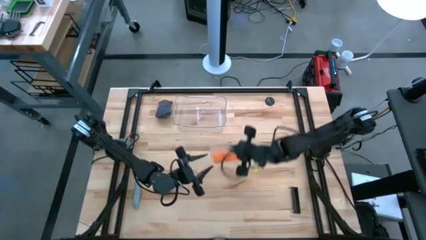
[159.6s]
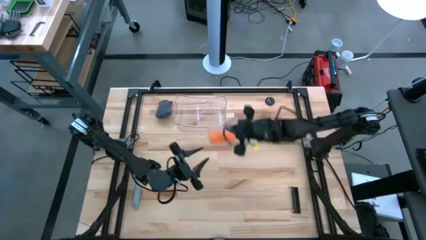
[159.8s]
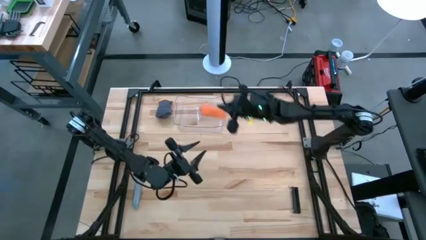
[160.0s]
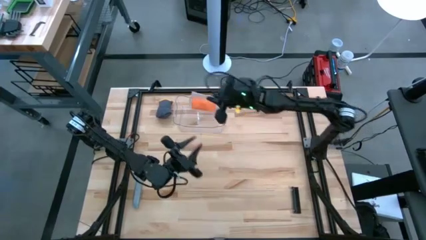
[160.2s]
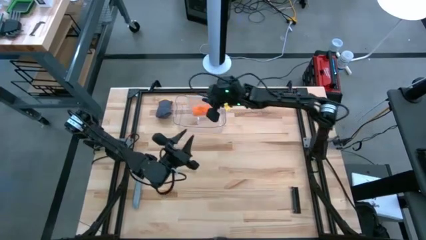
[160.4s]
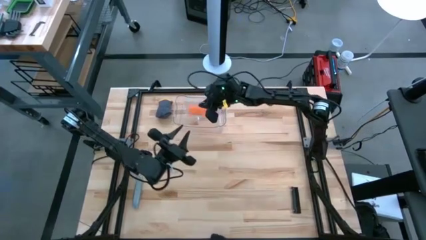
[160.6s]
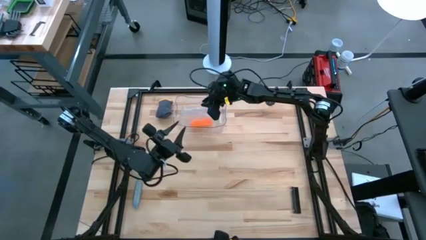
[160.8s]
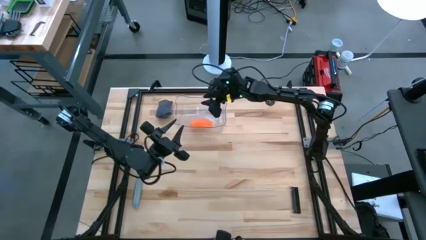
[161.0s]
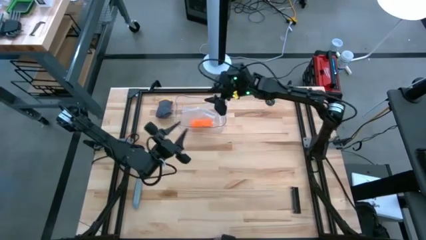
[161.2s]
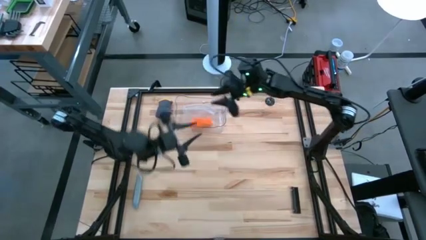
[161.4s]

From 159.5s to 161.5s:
Task: Roll bandage
Put the transparent ziplock into the transparent bin

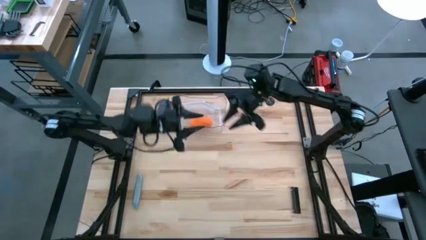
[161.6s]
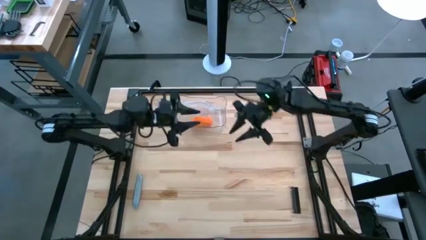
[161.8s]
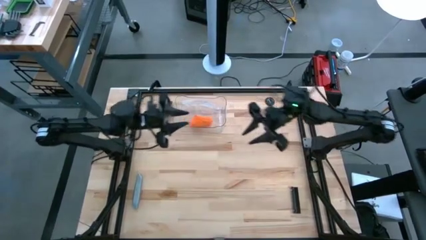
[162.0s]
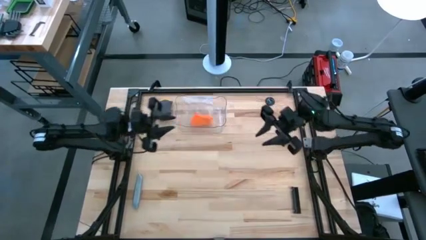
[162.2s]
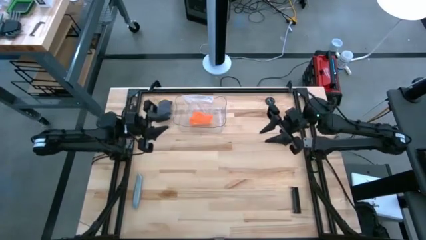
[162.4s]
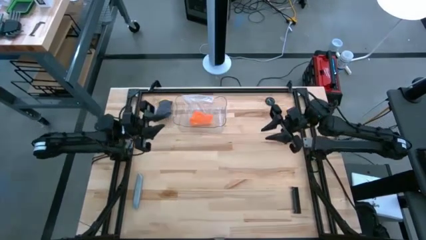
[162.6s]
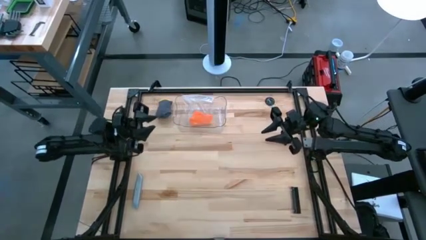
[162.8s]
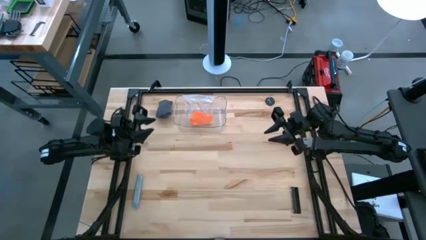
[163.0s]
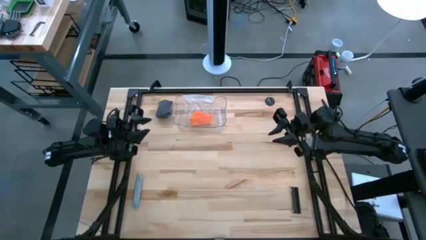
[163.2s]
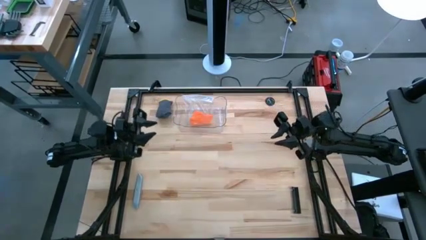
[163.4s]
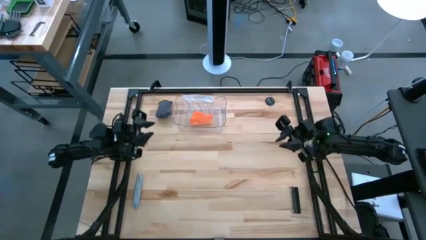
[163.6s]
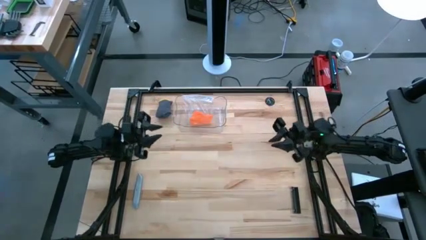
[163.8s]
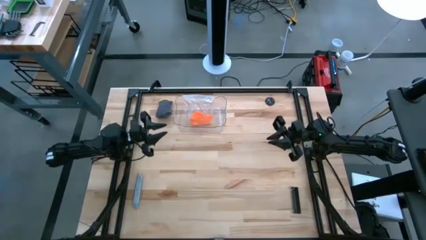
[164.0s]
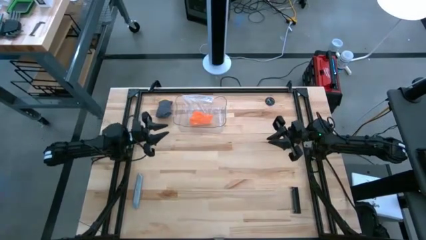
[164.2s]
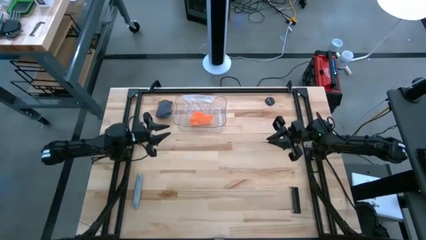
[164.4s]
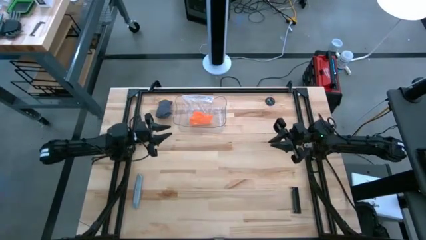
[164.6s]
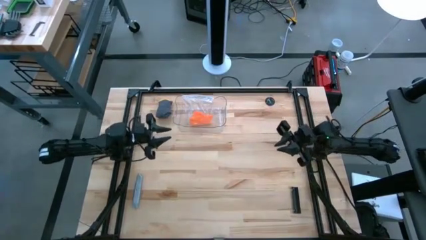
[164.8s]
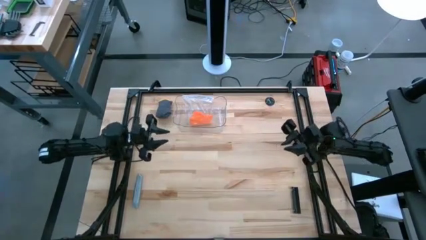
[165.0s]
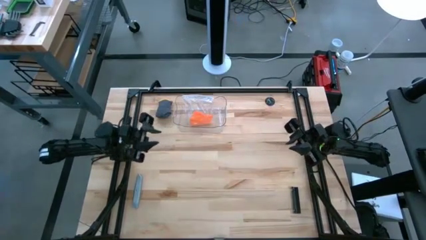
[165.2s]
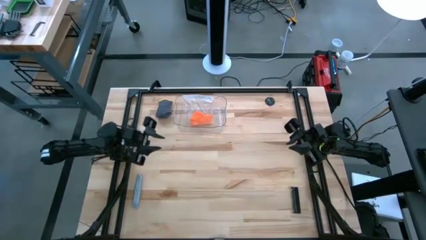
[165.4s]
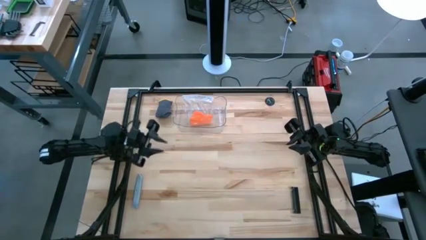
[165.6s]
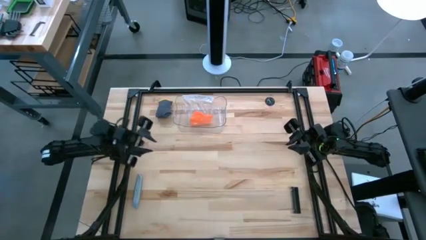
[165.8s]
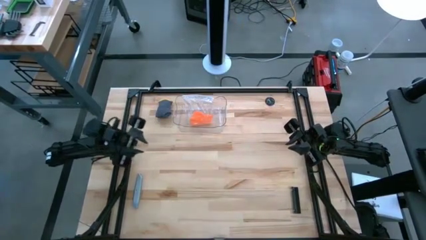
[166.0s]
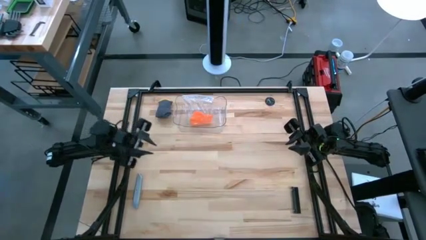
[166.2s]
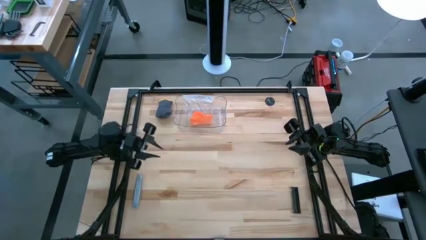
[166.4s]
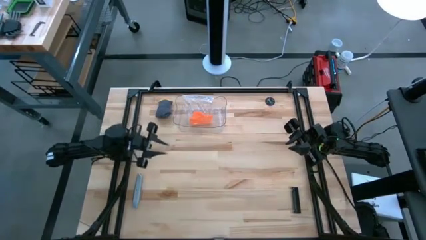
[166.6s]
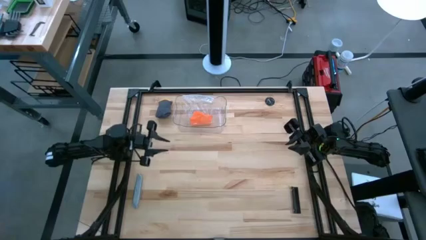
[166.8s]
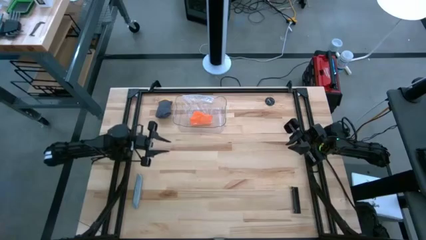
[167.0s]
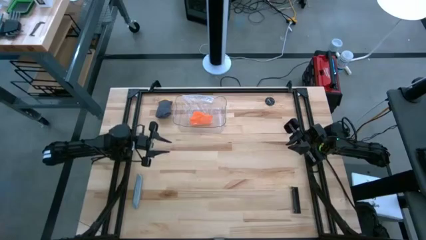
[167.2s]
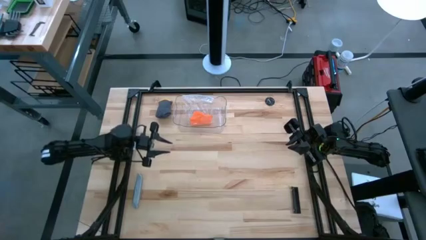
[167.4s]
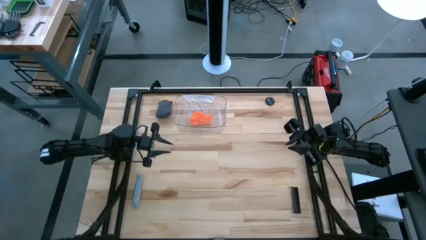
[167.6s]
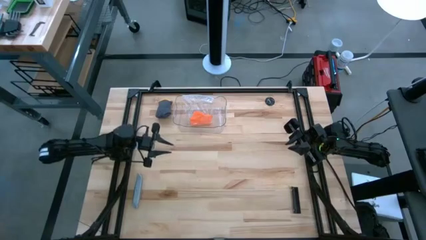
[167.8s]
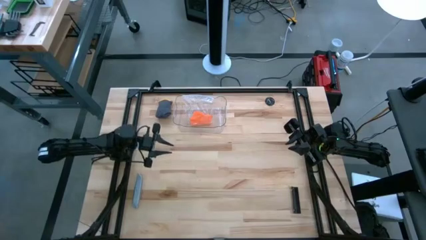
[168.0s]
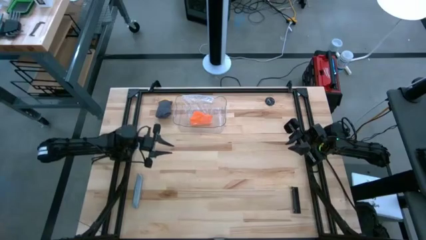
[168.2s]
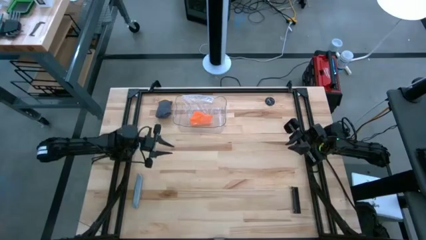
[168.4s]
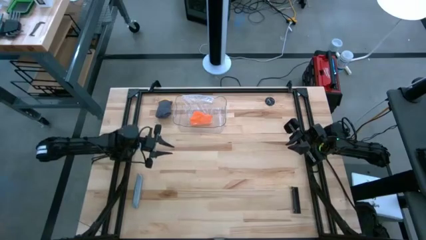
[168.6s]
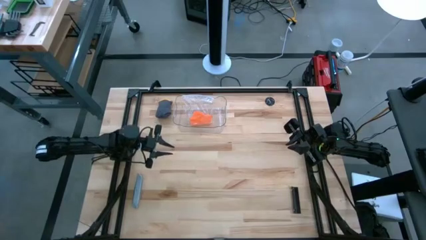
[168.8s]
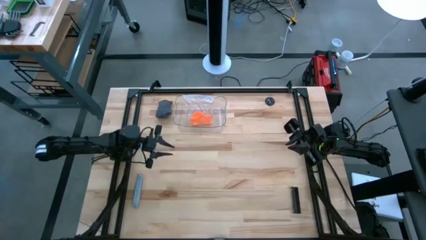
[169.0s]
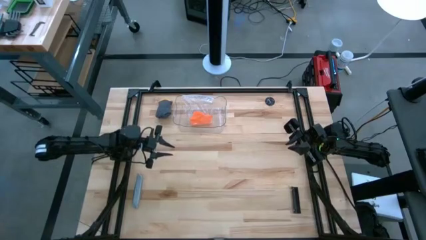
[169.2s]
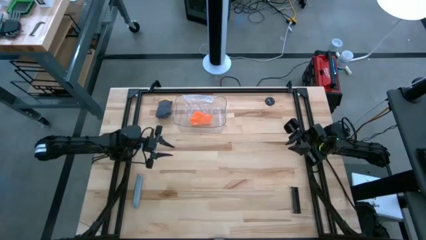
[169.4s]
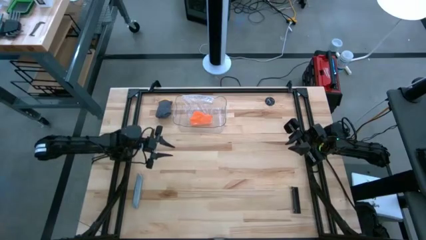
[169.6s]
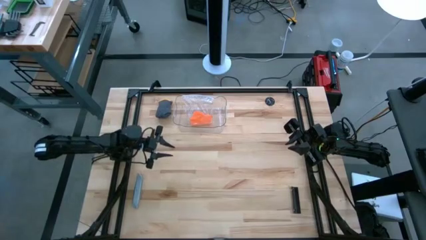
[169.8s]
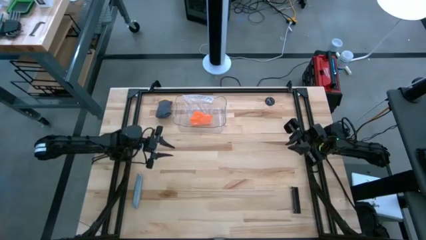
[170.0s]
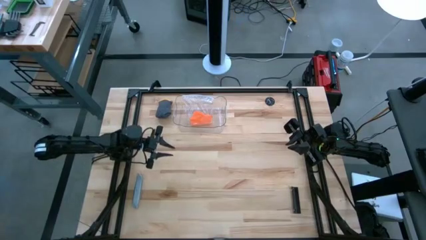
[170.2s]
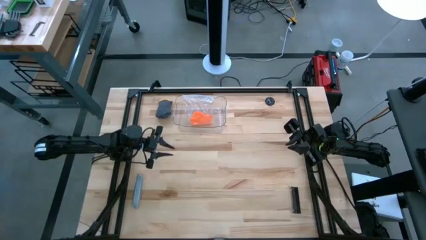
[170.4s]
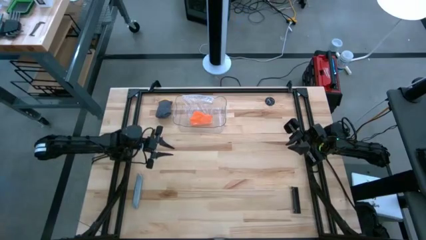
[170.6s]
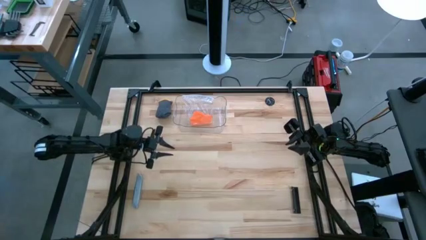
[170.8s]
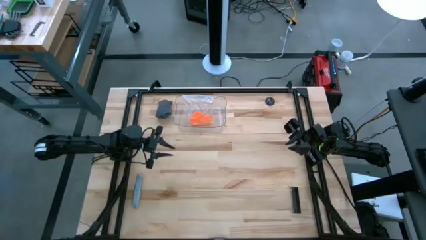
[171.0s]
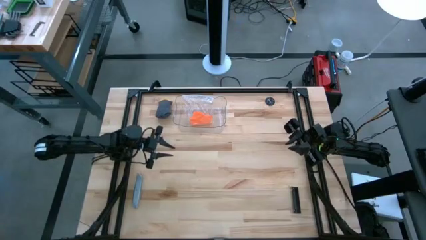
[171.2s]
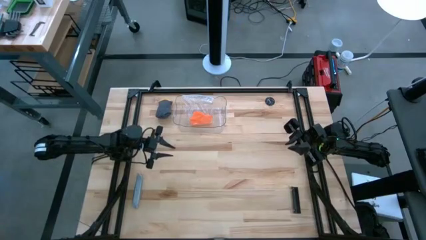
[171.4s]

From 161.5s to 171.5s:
Return to Home Position

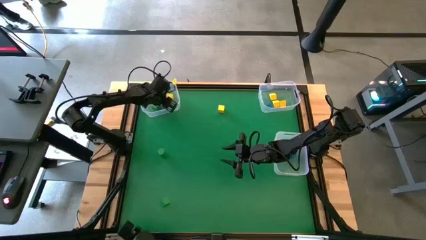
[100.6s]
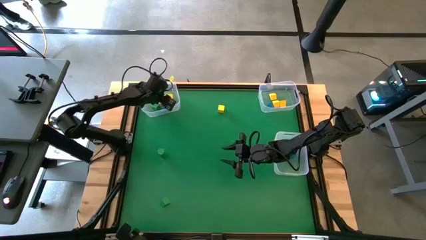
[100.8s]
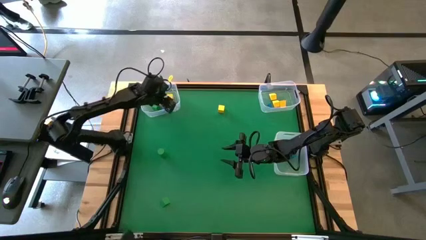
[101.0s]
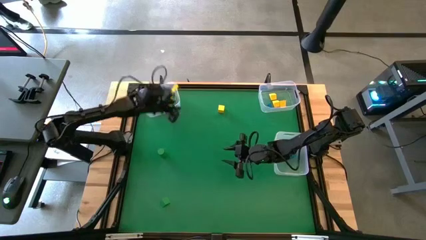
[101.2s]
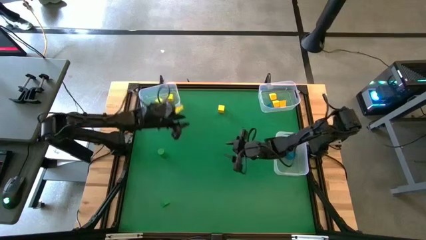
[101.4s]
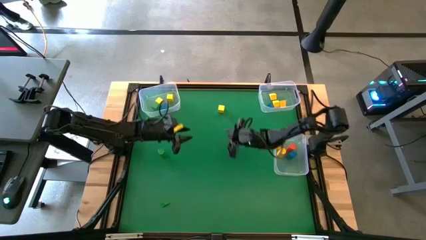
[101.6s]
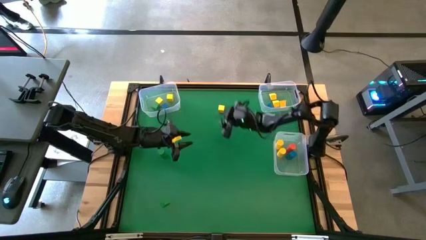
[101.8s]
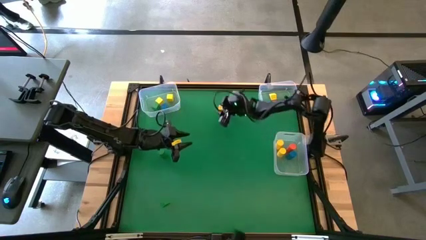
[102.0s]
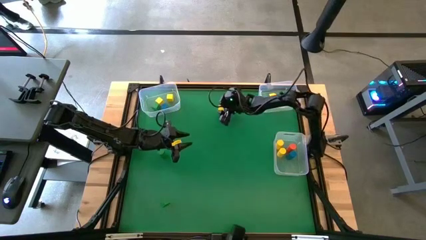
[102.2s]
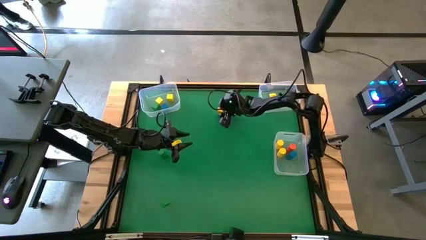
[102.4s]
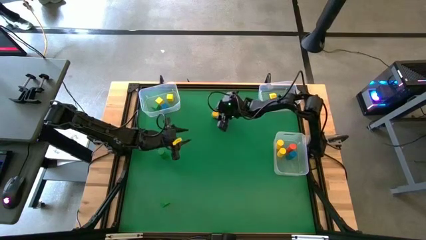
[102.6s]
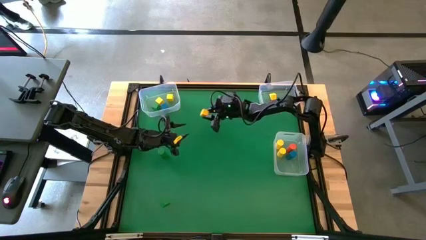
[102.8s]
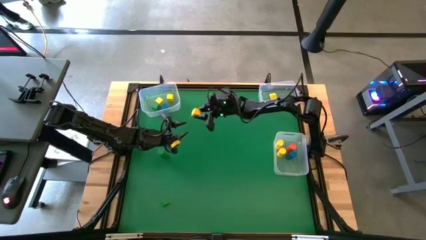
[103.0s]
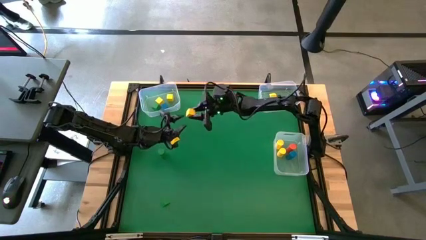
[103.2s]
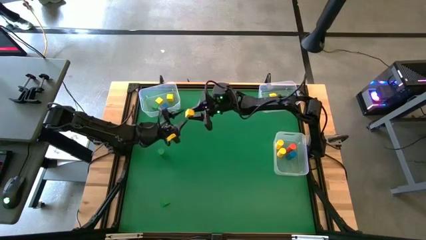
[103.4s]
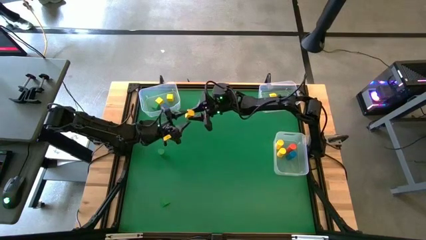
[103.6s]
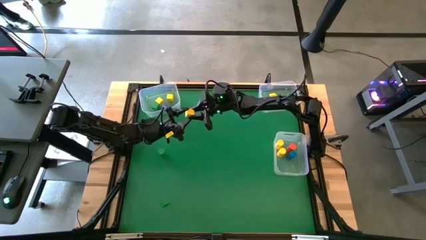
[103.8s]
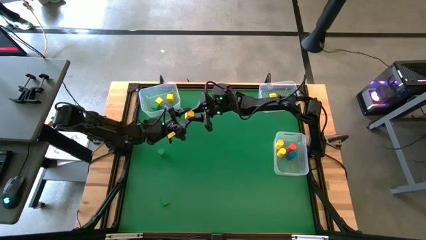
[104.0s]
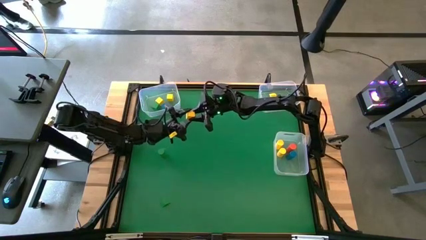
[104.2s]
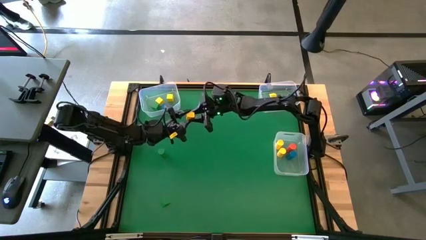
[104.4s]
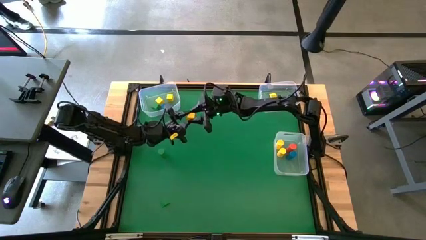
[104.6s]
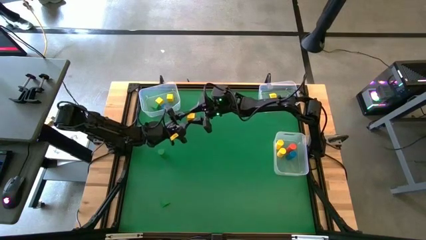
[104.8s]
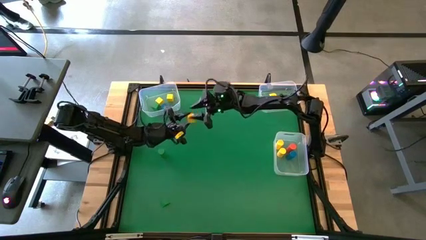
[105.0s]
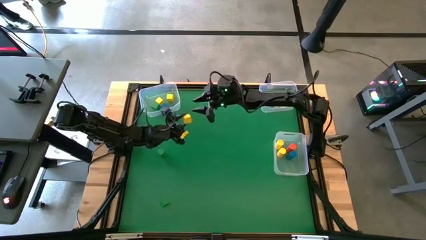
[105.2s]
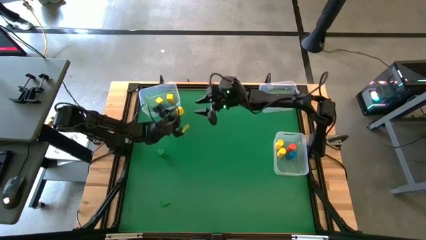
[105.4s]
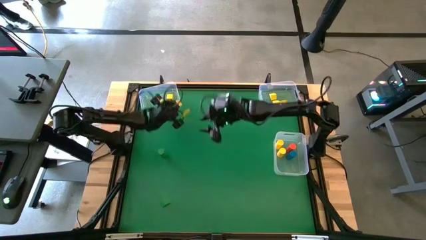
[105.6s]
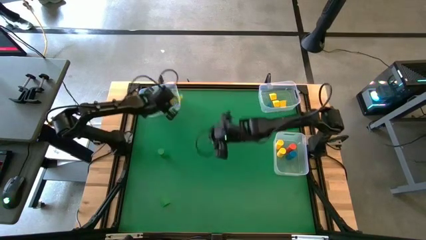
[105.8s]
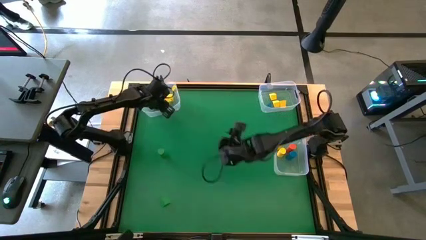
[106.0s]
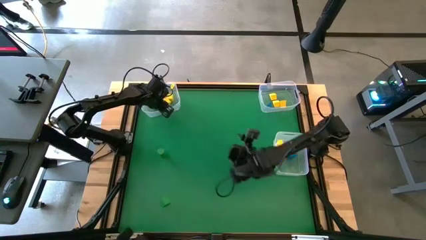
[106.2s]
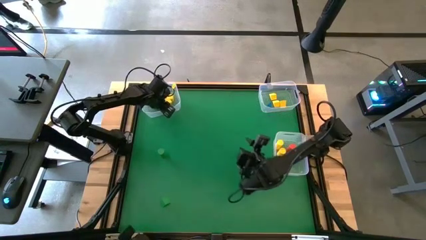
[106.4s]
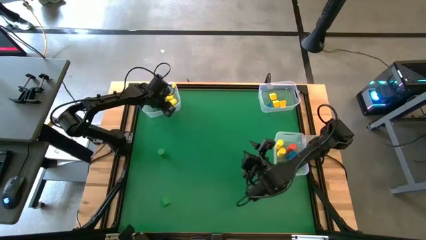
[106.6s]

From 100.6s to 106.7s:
Task: Sort blocks by size
Put the yellow cube block into the top left transparent bin
